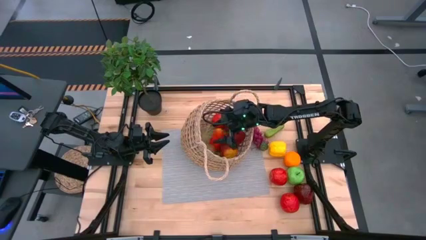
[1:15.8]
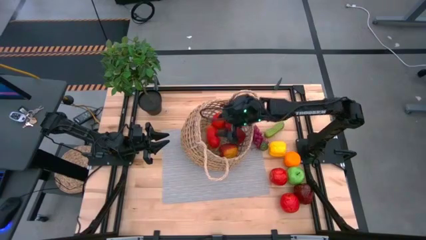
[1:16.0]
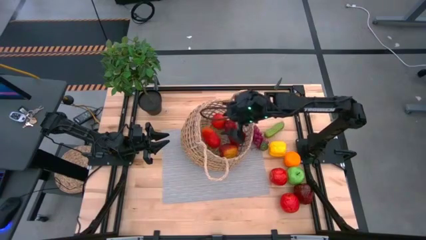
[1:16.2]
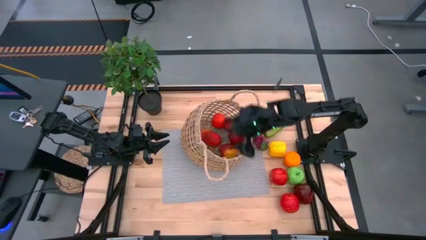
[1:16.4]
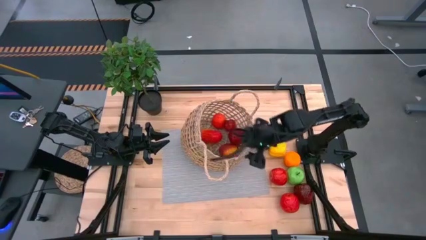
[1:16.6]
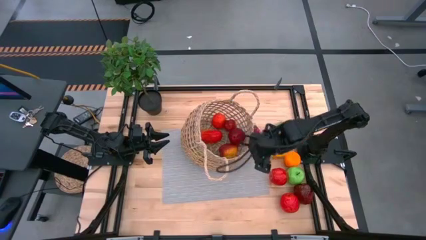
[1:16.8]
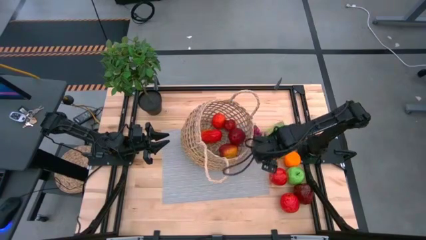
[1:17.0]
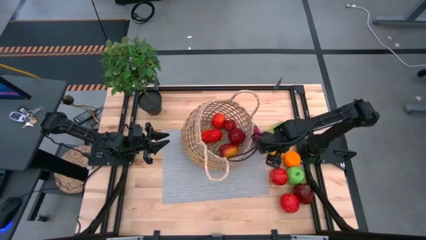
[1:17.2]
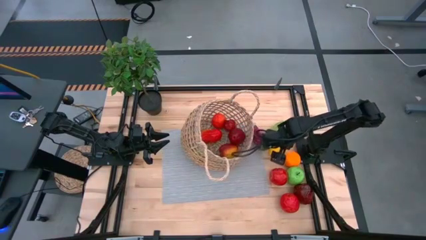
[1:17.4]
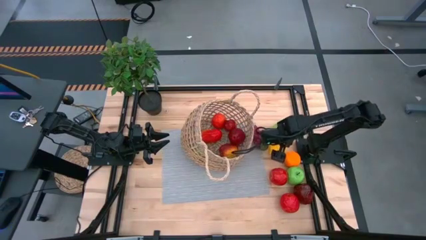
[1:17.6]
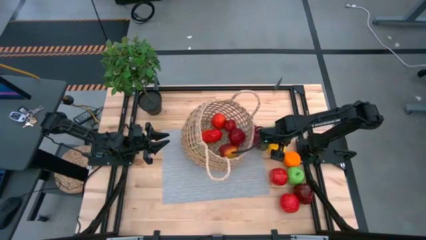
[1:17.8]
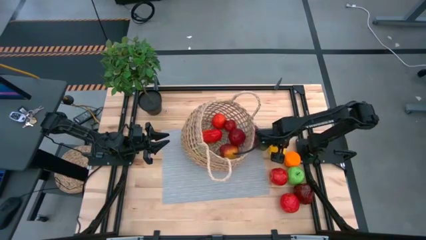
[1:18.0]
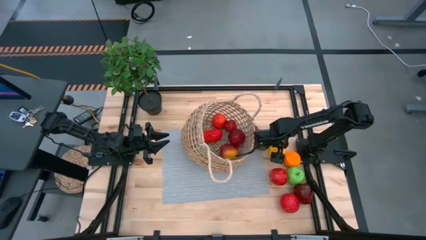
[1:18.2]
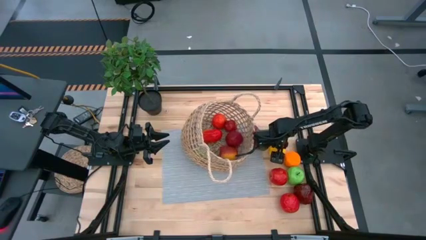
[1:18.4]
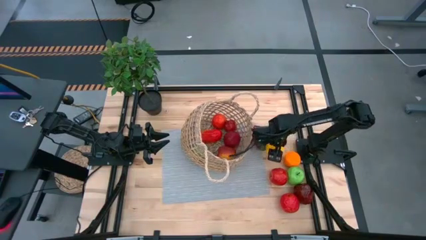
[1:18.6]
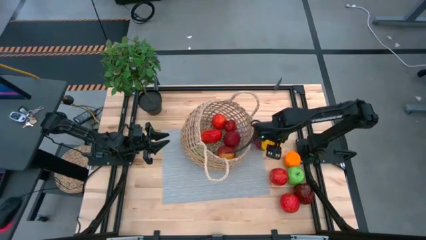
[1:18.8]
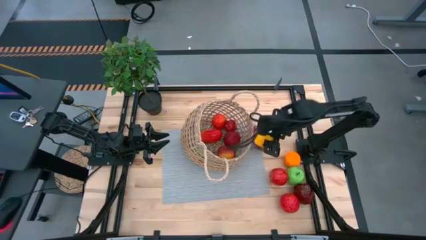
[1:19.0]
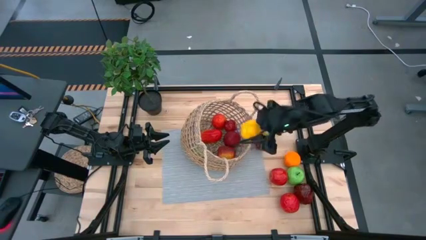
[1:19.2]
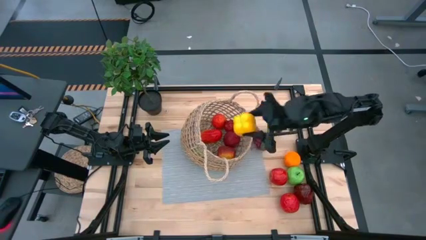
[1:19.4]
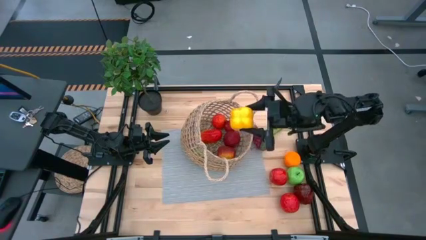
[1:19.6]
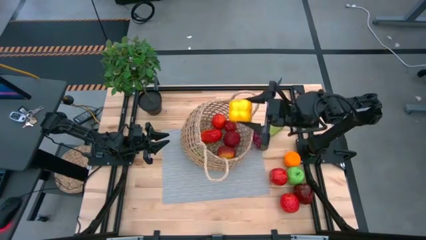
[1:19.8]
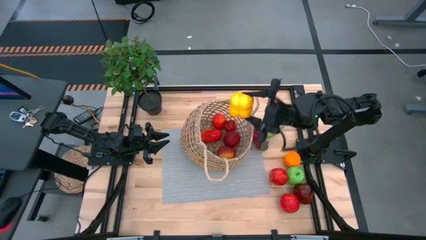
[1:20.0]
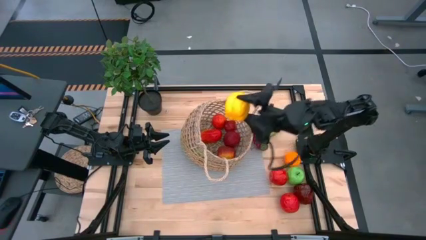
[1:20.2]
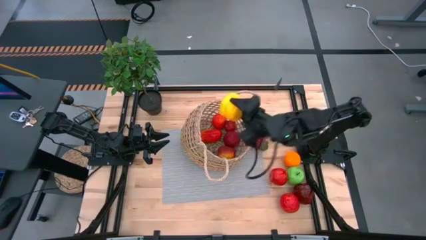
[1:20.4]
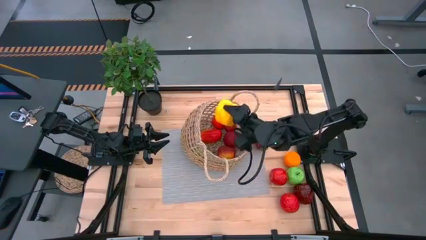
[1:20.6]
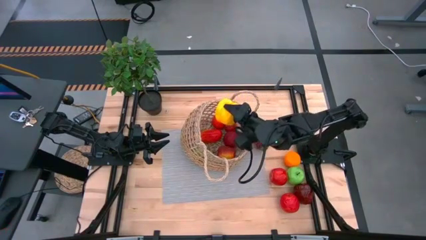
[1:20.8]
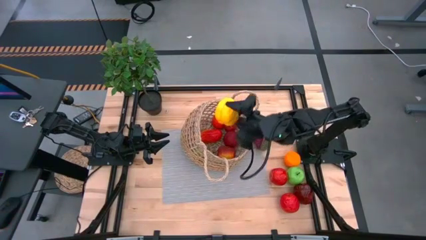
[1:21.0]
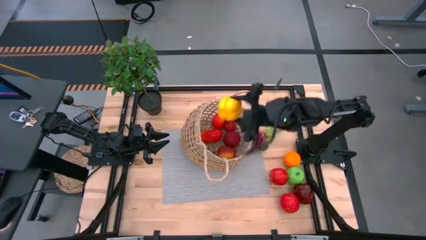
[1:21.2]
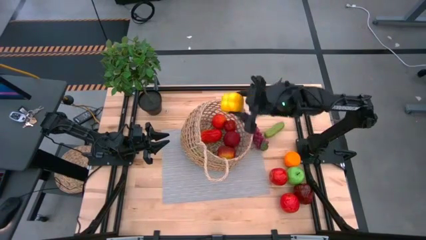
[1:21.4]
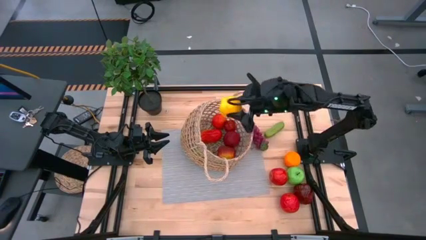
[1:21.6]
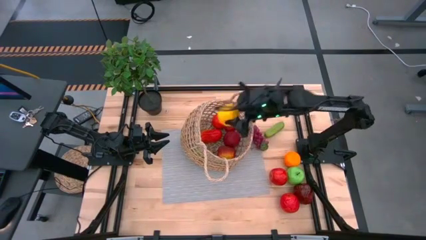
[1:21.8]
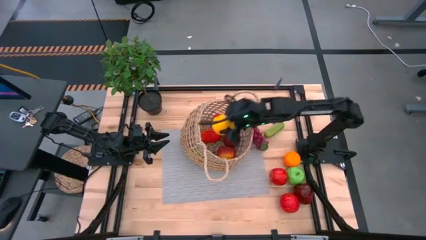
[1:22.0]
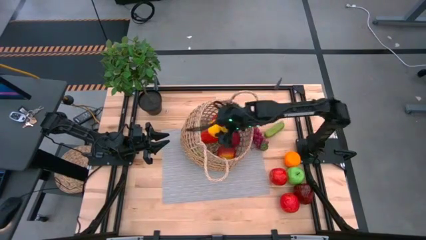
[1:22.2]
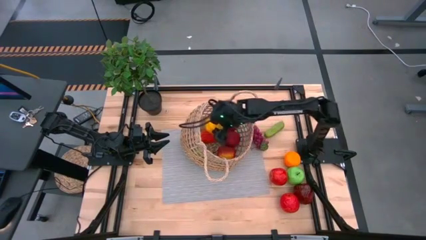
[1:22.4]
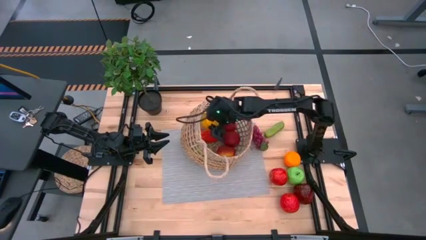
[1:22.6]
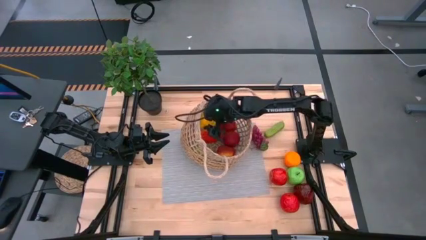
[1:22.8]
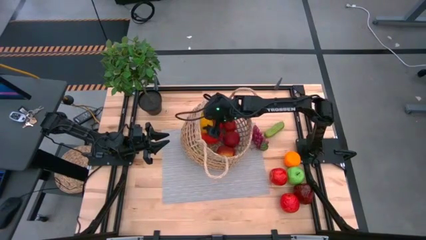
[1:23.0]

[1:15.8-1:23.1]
Task: Build produce basket
Put the yellow bell pepper into the brown basket

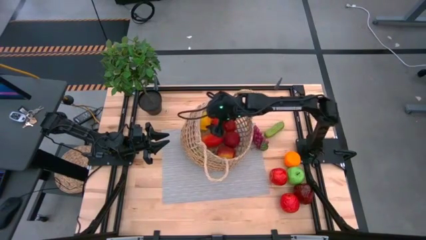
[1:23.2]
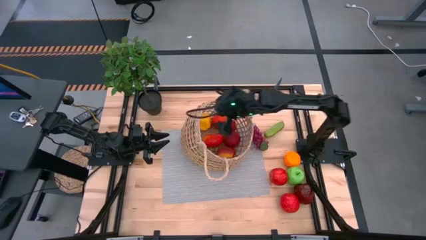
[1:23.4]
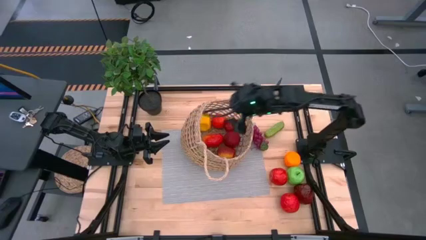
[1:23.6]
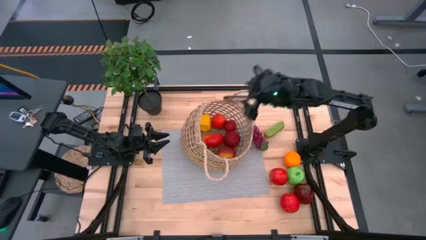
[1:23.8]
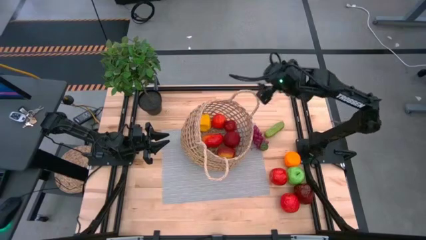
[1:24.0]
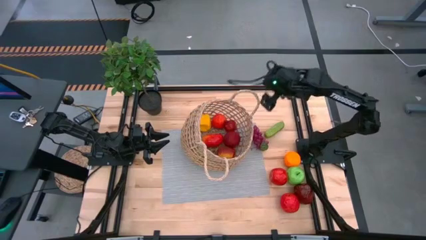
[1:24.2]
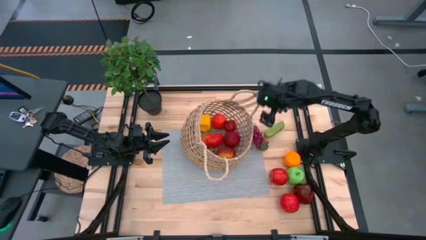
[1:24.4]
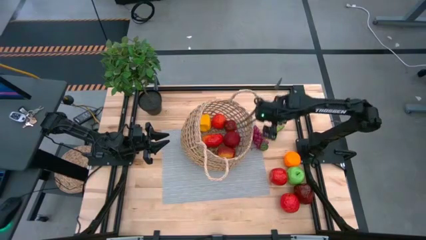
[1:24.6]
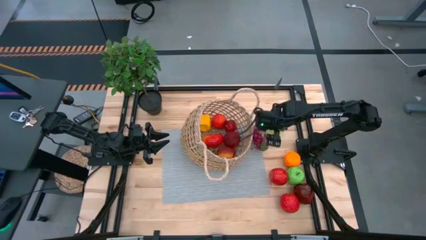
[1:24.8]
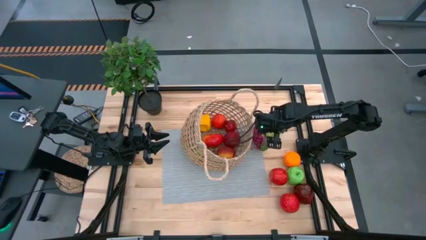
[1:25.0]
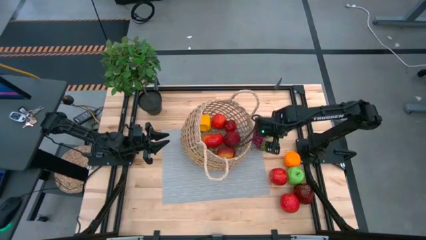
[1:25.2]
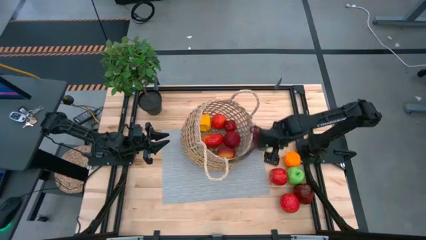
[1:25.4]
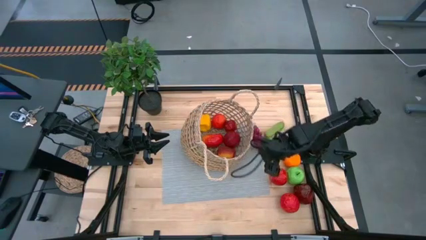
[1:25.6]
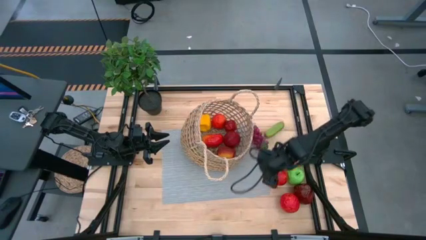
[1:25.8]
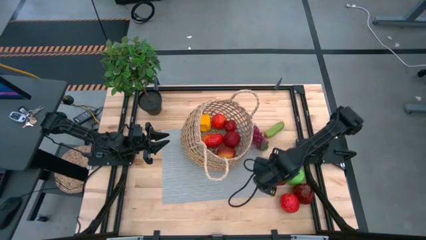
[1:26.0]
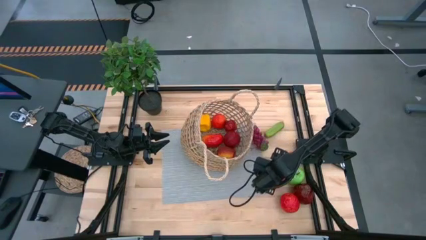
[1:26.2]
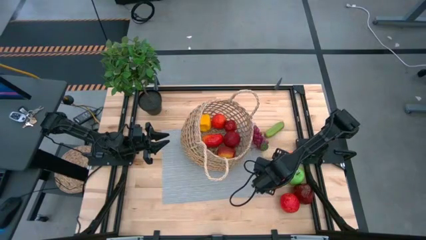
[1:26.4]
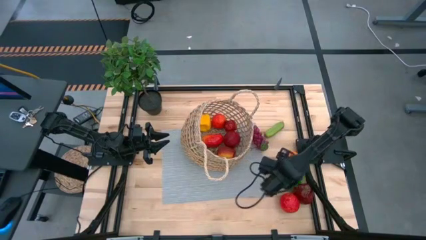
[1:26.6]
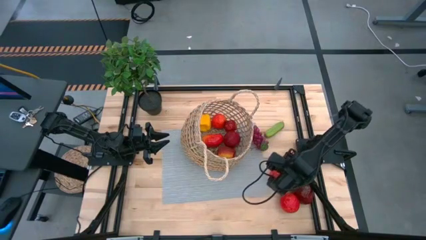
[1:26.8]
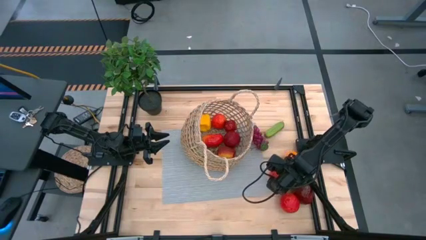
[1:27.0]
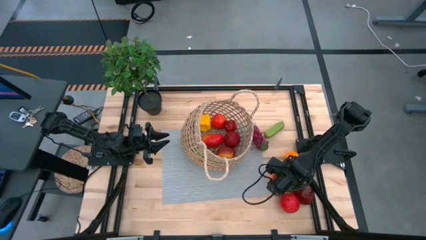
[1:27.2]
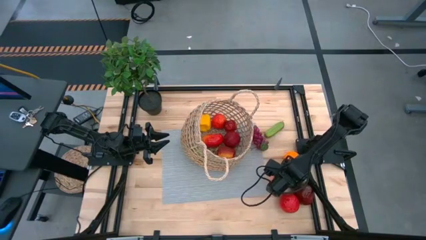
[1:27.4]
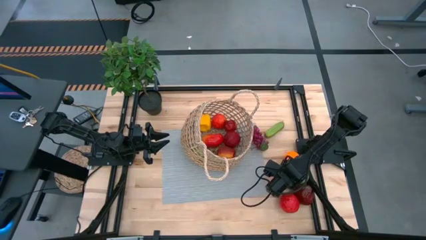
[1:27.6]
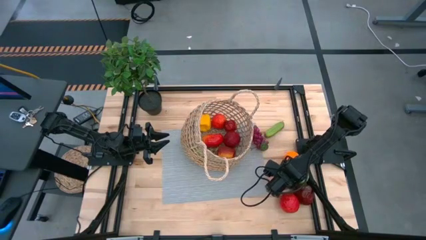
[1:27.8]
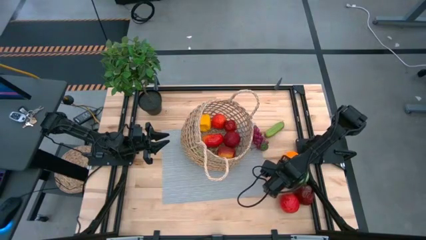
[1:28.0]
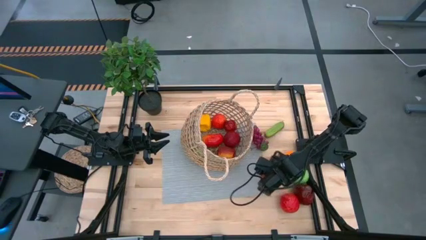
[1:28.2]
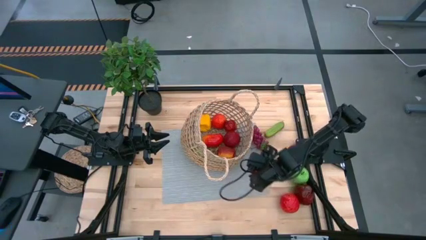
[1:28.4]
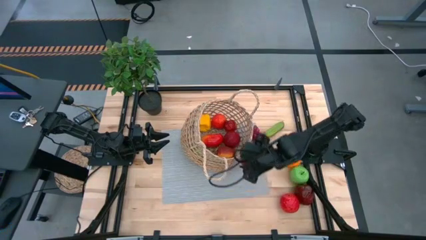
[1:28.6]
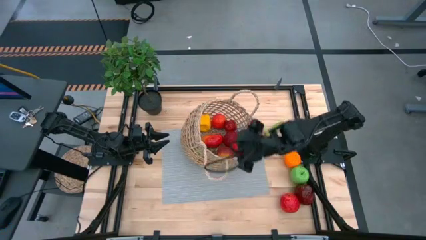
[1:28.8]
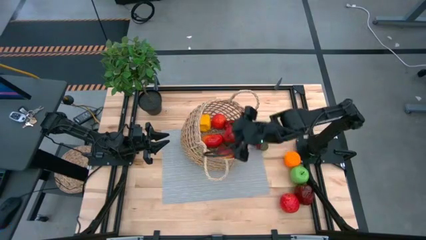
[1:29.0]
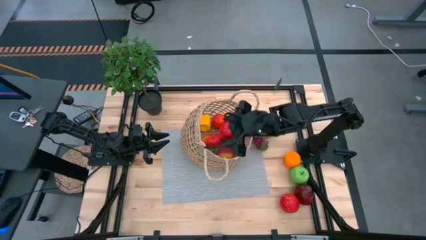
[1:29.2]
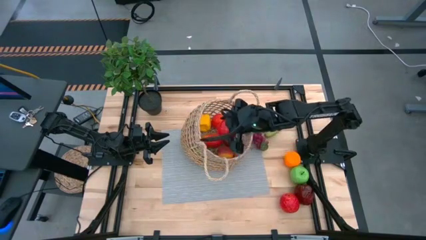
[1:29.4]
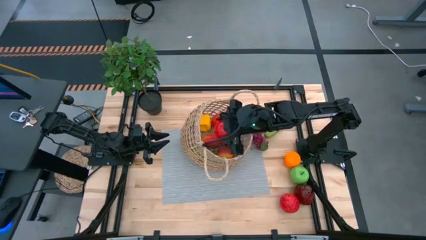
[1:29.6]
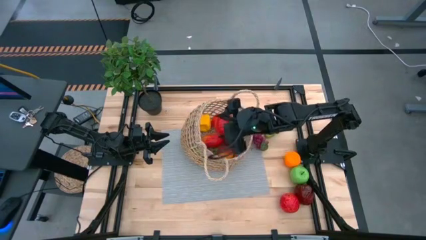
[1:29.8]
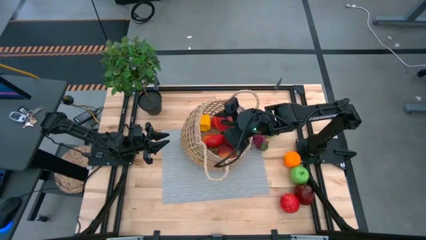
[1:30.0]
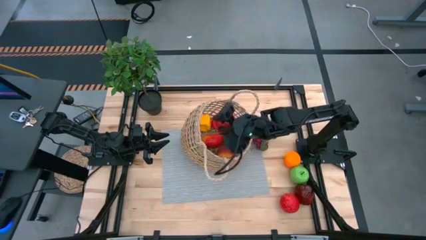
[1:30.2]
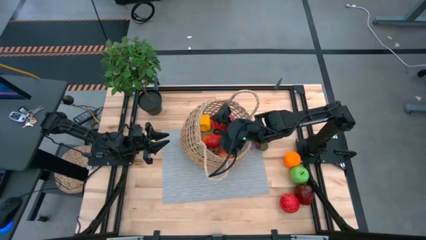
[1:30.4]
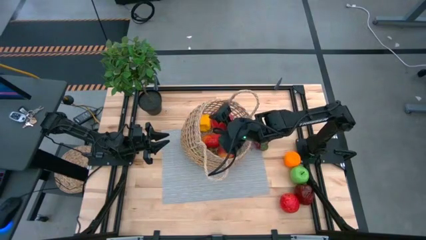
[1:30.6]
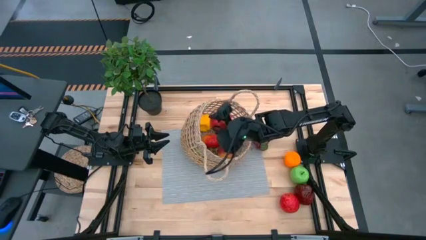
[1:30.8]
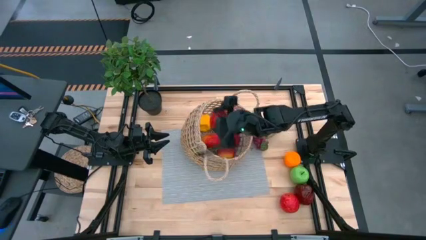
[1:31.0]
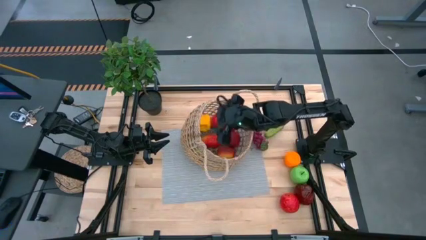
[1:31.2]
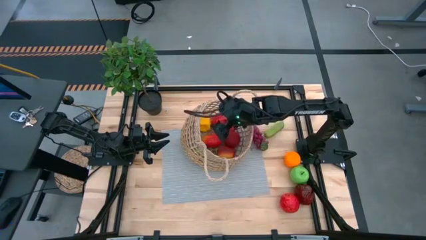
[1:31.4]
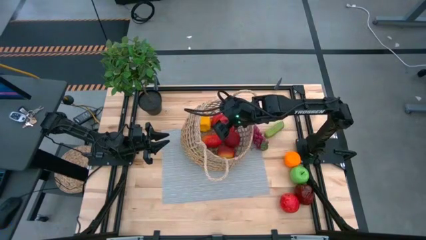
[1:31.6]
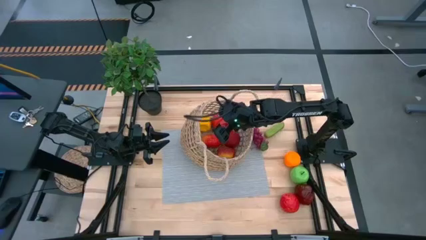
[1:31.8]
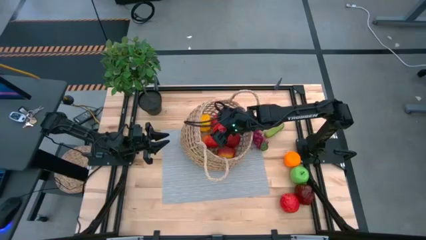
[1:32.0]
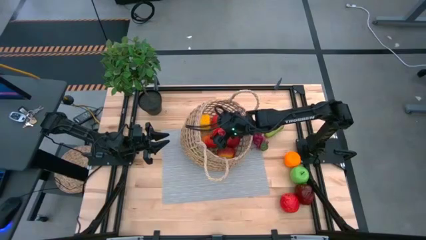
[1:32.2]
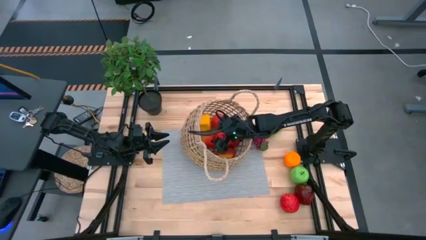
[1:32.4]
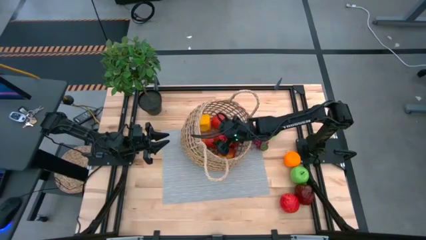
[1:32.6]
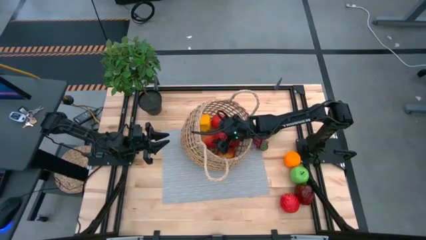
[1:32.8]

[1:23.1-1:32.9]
Put the red apple into the brown basket
